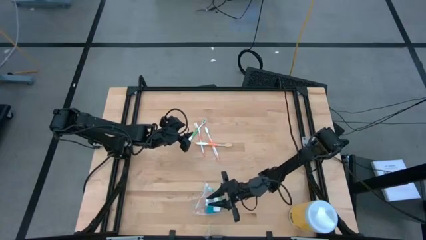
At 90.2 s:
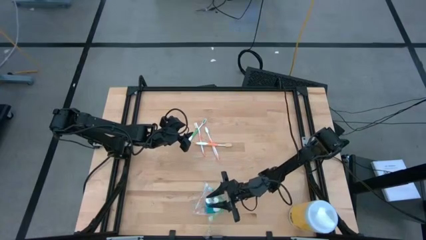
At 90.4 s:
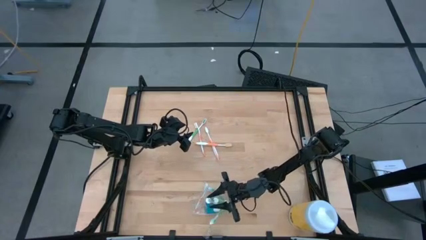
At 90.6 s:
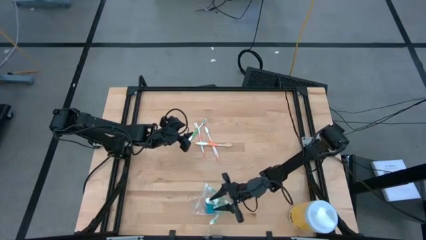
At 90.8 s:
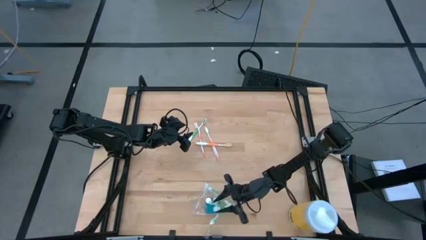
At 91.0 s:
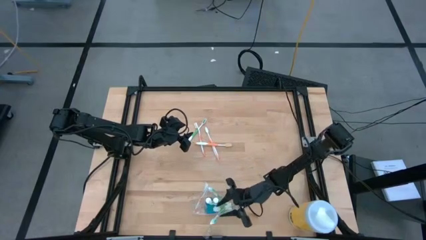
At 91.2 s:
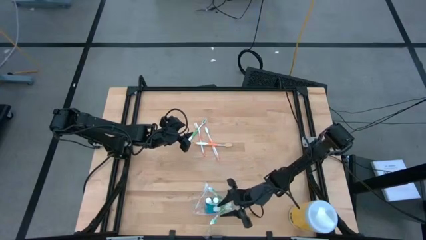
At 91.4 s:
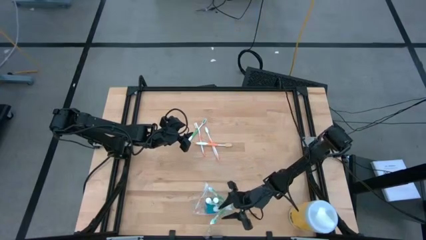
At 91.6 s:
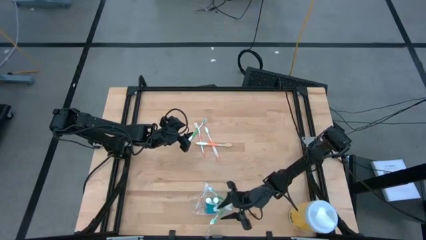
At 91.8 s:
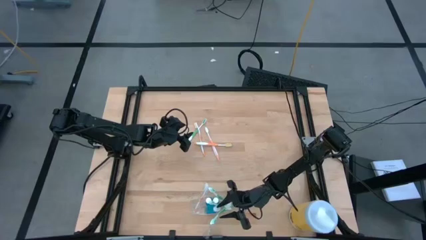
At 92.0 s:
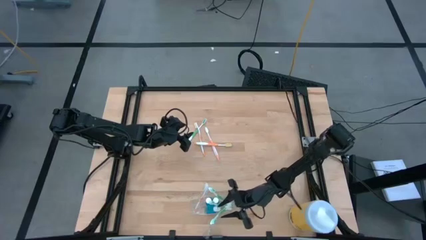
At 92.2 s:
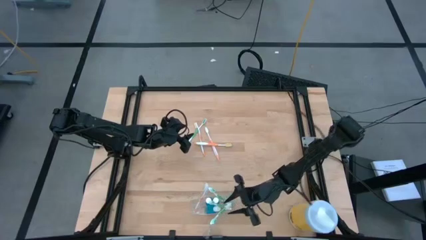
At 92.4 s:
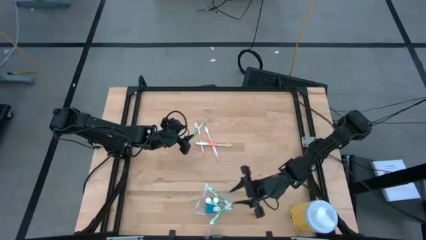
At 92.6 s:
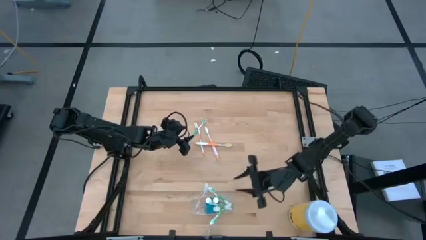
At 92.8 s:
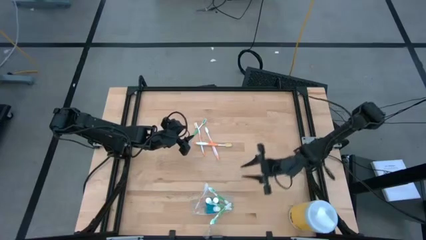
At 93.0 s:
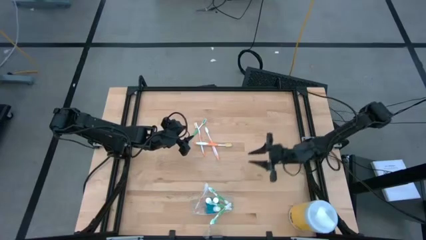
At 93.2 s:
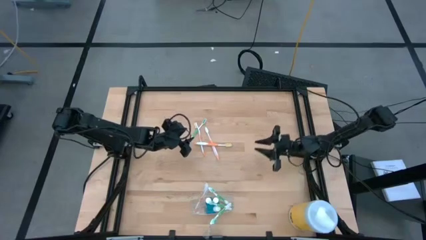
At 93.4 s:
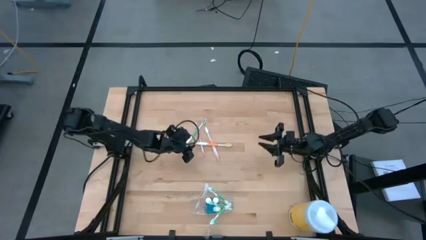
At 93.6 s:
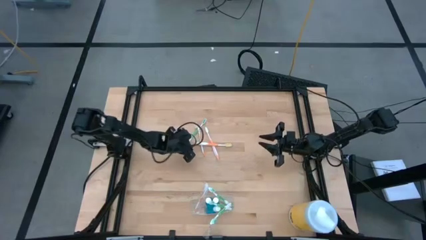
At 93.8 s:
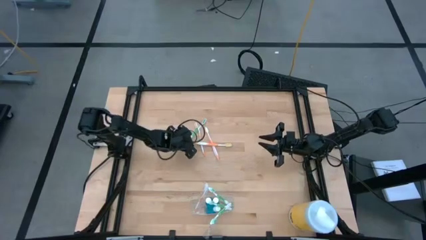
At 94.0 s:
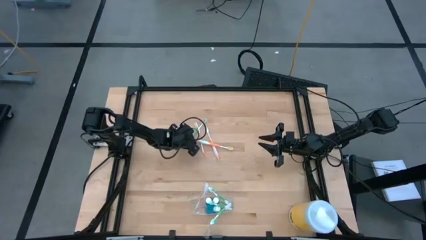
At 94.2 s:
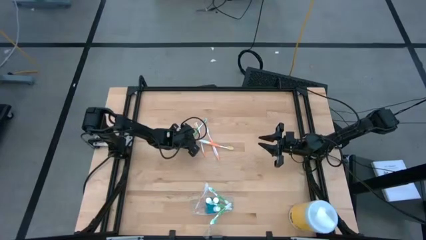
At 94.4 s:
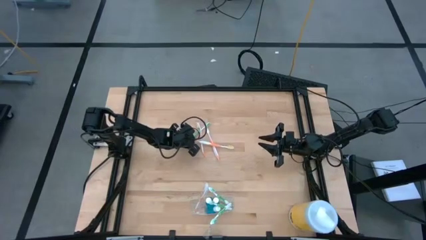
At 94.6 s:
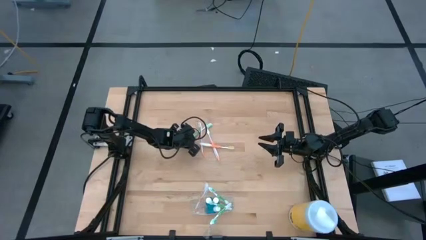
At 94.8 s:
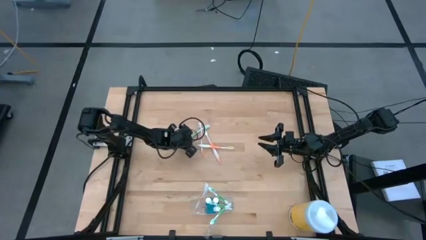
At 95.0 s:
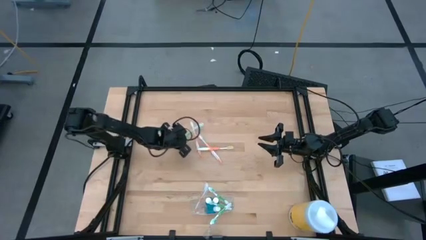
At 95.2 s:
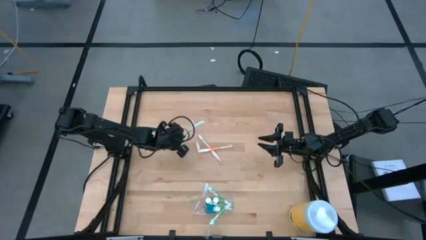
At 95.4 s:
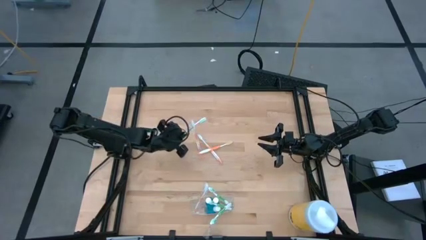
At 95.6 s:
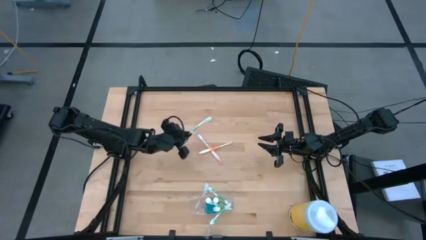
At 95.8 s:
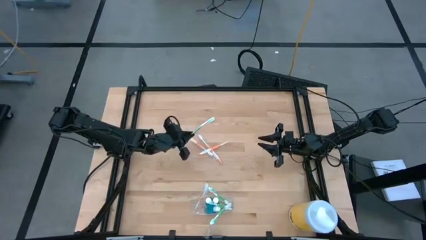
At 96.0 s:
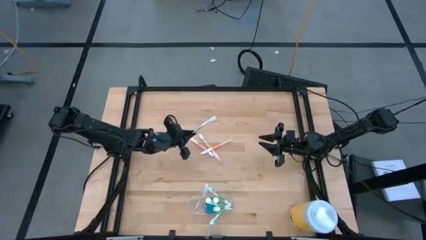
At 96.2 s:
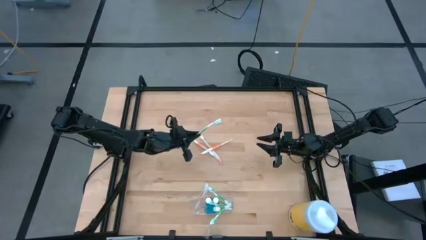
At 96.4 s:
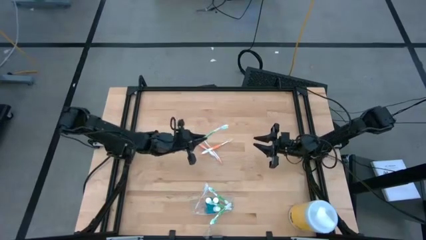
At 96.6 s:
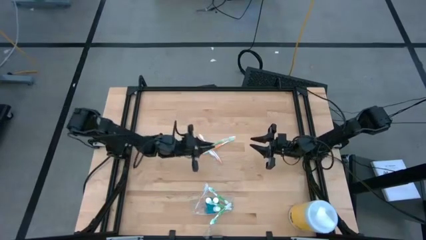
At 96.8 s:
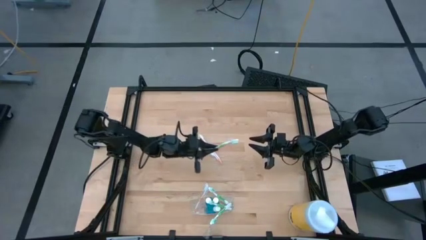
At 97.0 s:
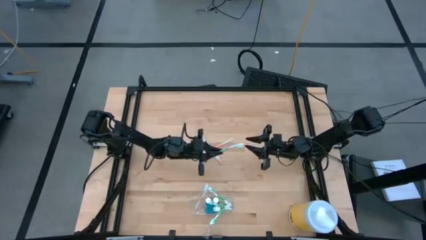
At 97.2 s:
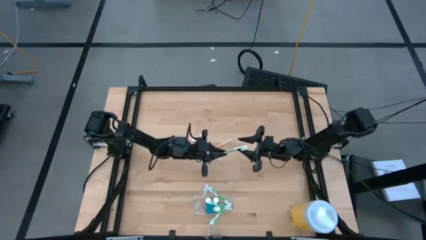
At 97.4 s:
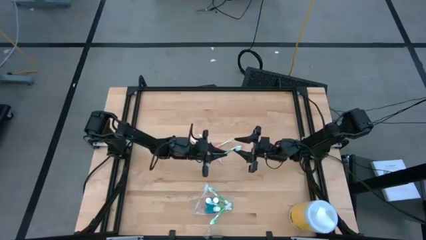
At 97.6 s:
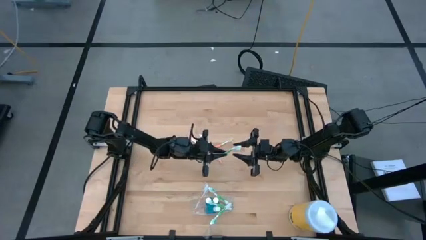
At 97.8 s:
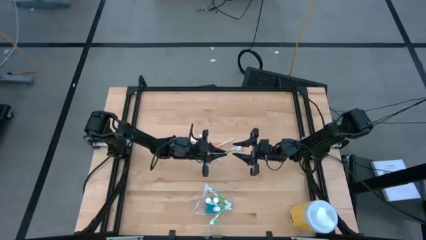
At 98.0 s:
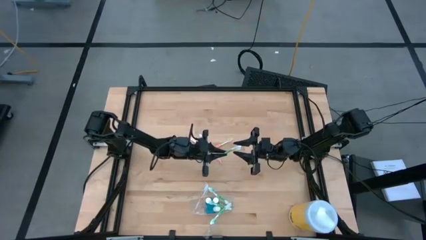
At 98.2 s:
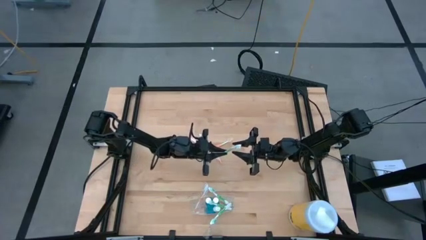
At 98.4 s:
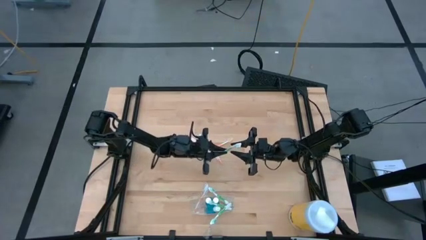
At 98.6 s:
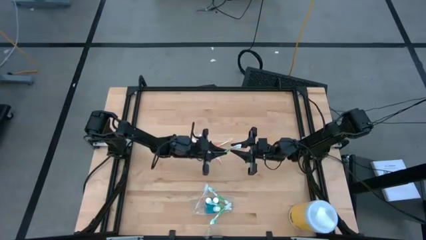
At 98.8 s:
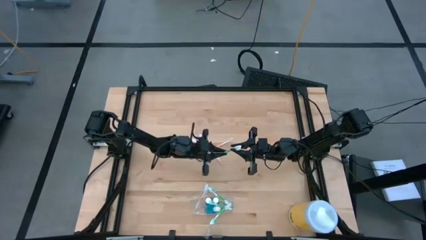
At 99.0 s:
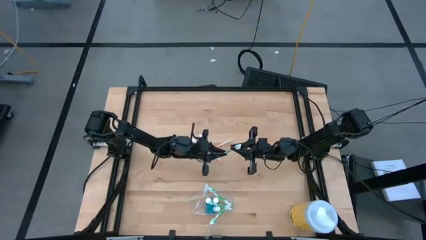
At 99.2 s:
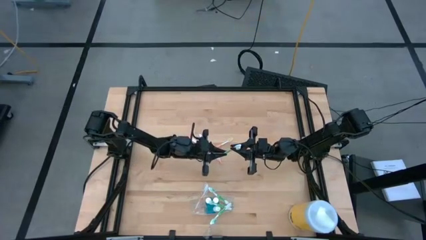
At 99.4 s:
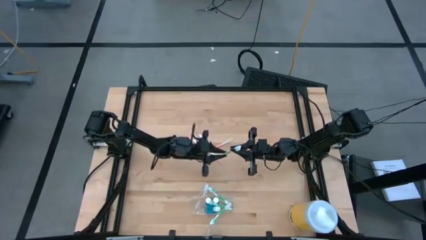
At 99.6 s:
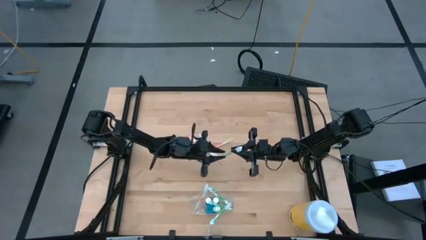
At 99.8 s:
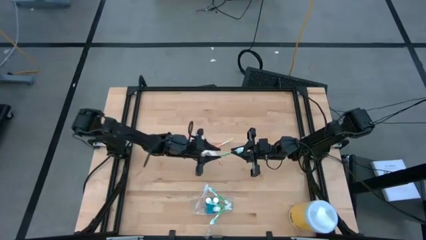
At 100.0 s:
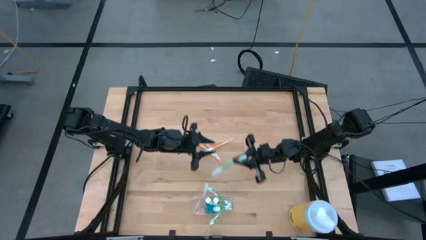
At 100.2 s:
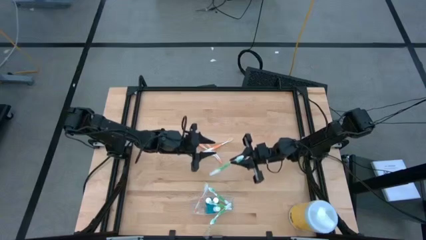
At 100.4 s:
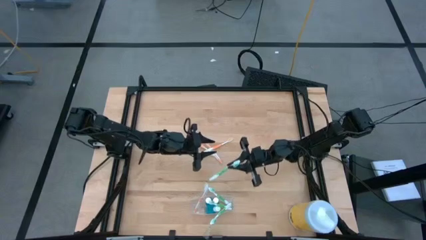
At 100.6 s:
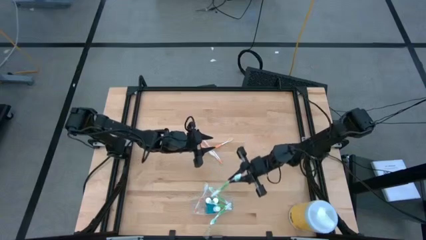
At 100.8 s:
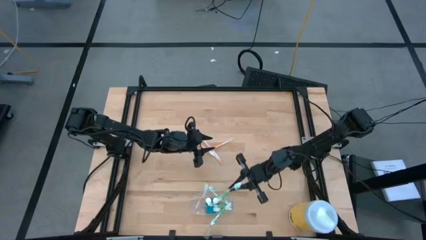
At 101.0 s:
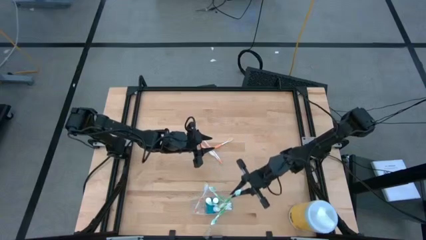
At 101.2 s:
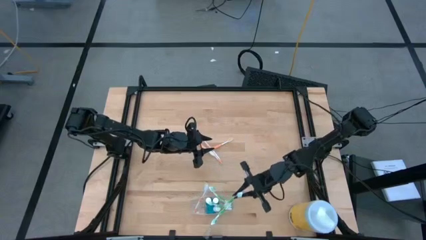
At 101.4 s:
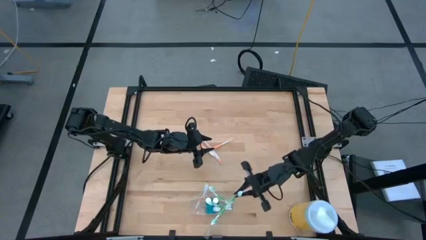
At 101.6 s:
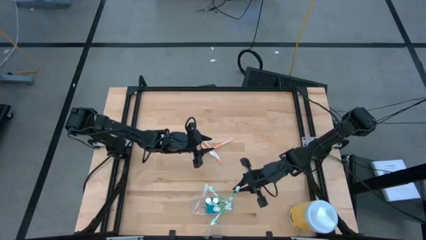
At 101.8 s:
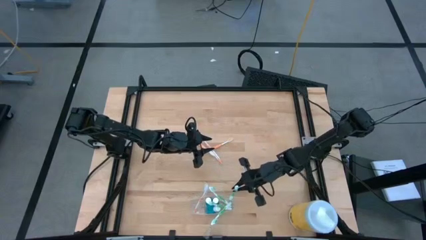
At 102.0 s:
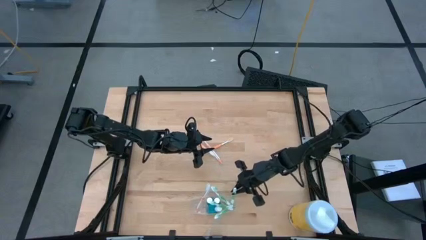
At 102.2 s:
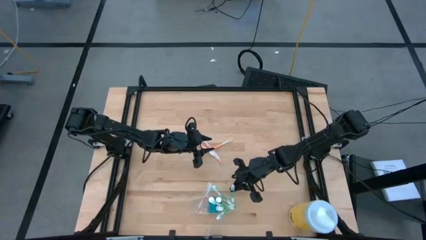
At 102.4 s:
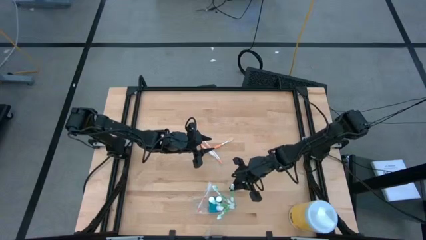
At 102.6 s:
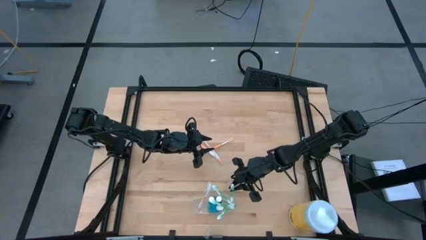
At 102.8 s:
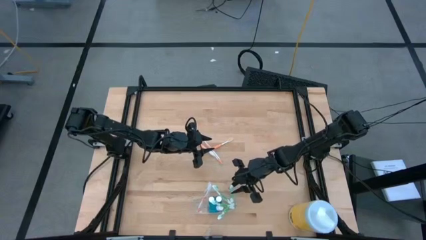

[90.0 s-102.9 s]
Task: Pick & Place toothbrushing station
Put the green toothbrush into the transparent organizer
